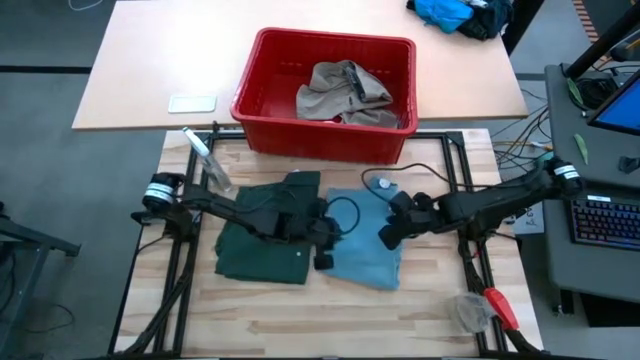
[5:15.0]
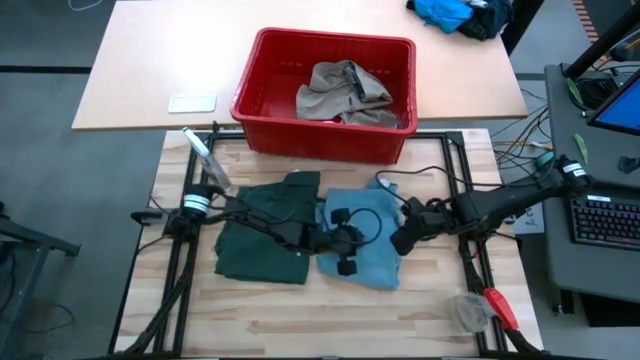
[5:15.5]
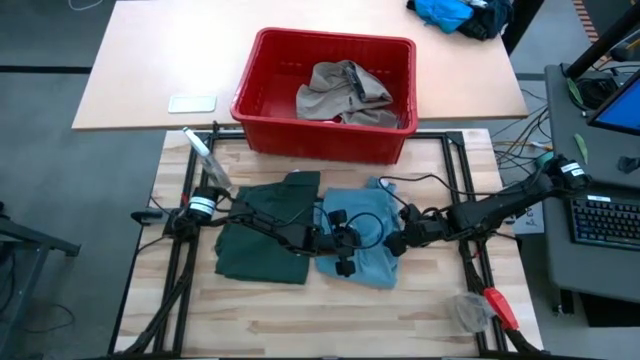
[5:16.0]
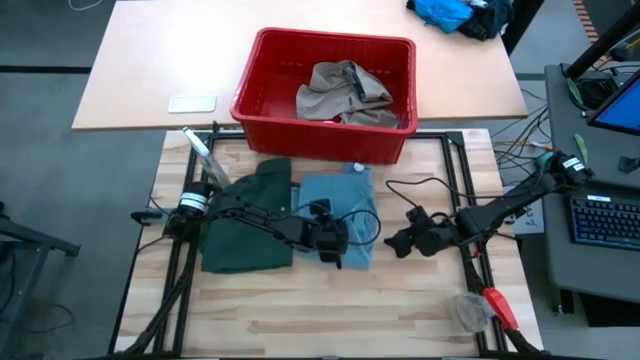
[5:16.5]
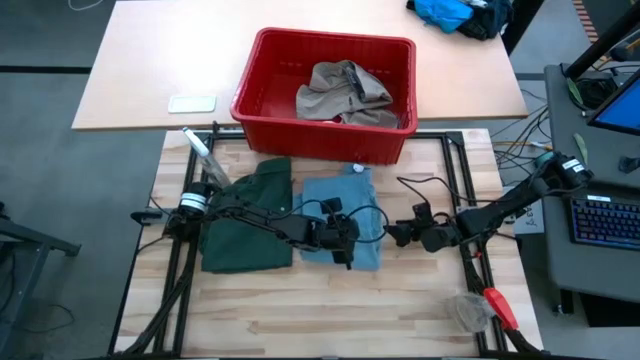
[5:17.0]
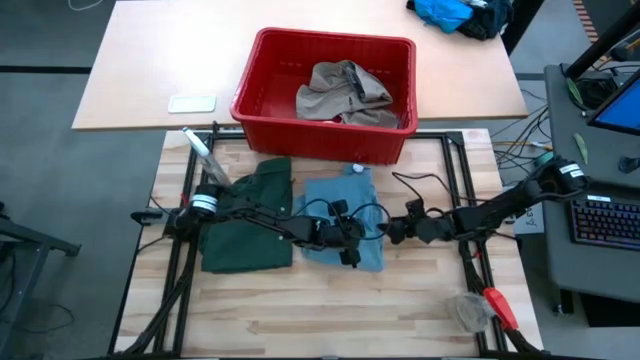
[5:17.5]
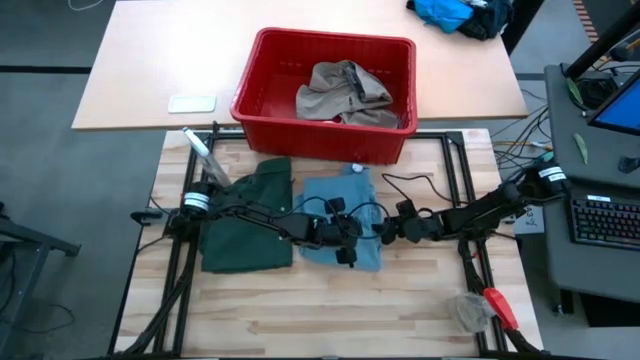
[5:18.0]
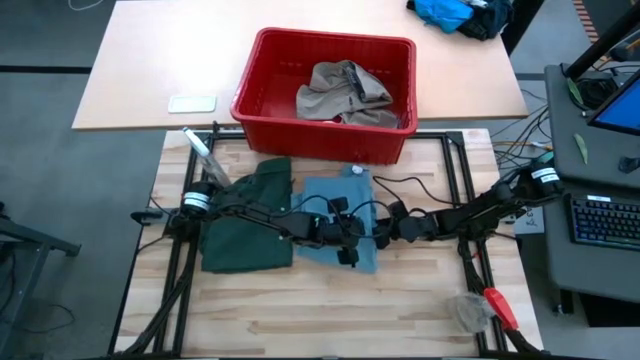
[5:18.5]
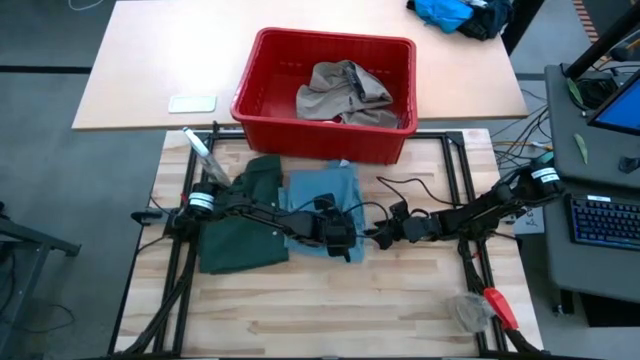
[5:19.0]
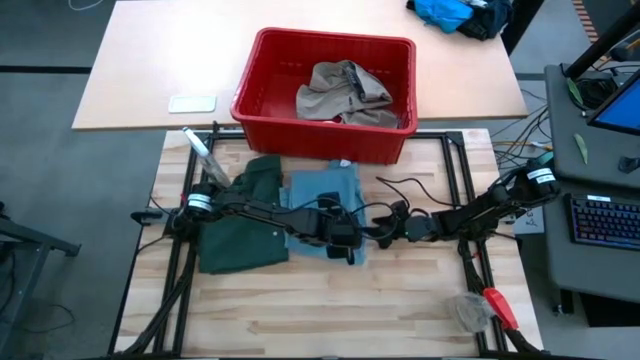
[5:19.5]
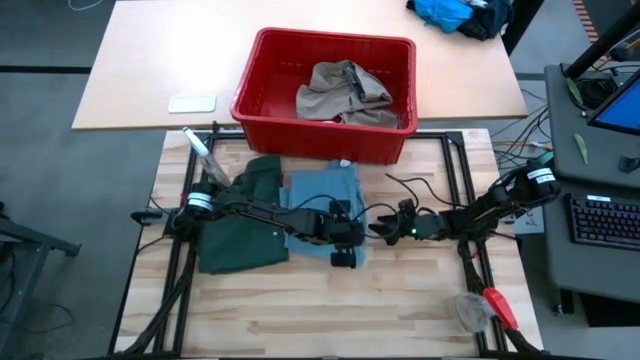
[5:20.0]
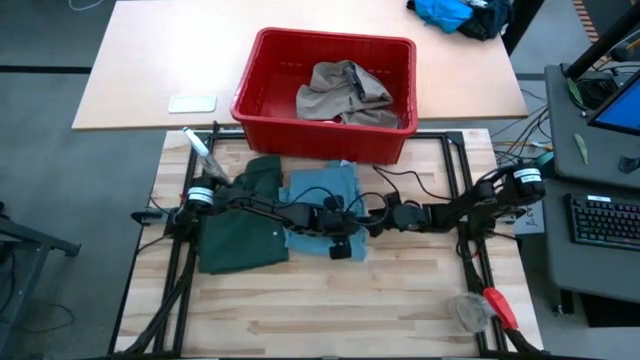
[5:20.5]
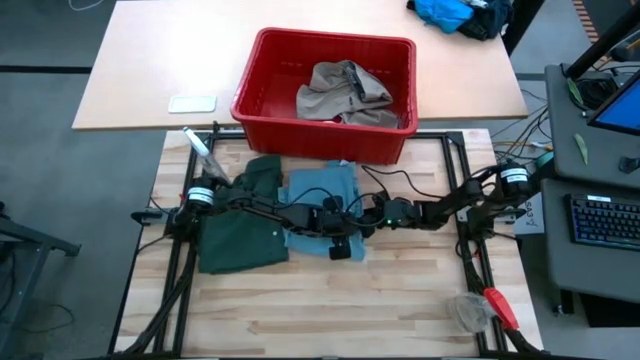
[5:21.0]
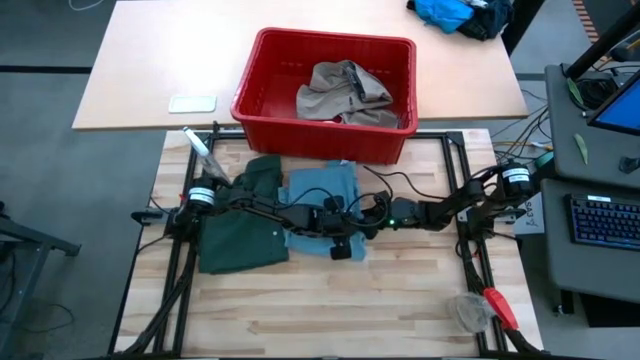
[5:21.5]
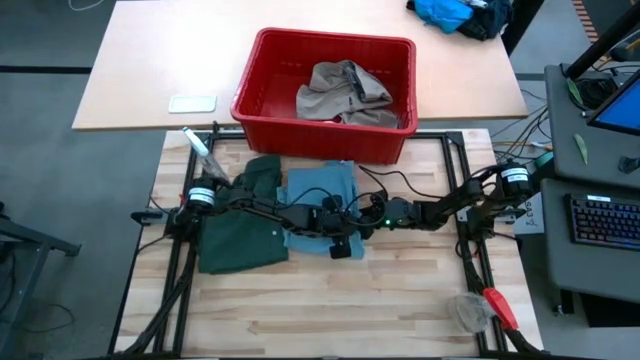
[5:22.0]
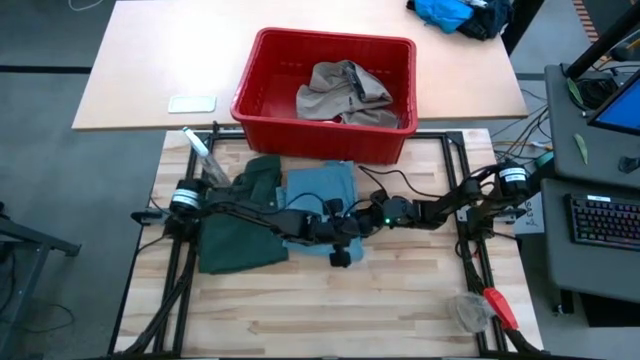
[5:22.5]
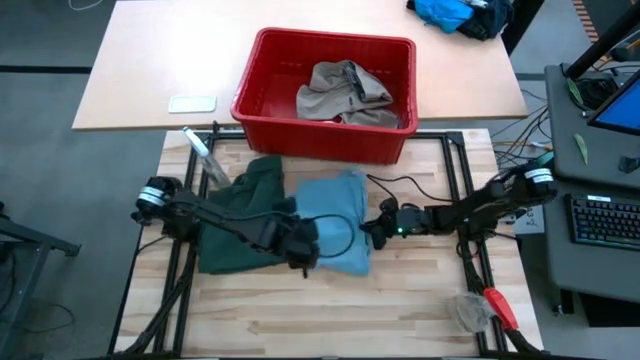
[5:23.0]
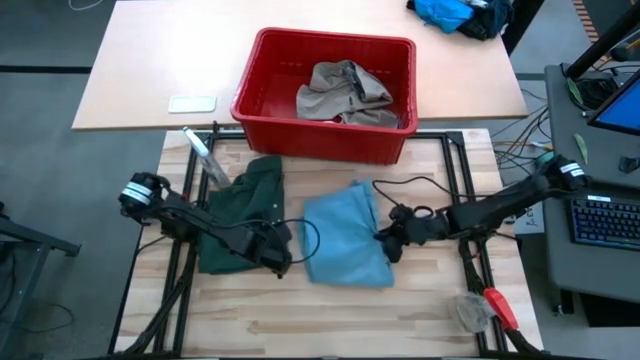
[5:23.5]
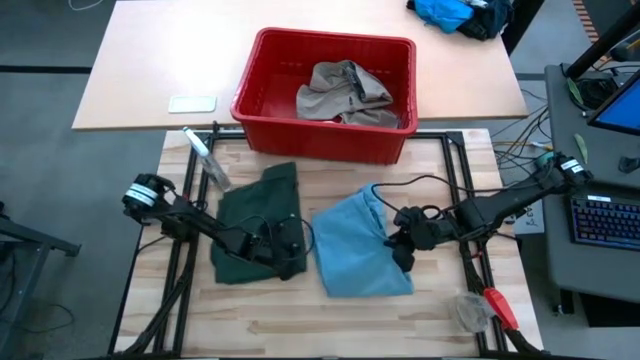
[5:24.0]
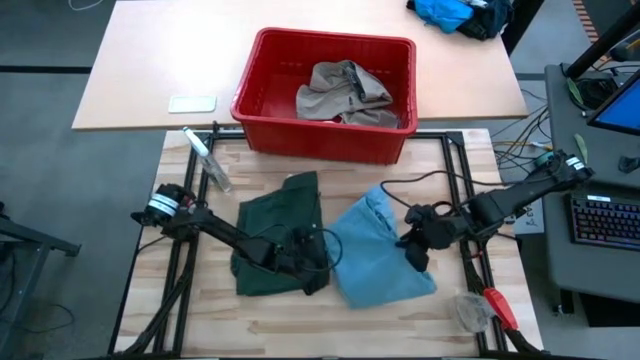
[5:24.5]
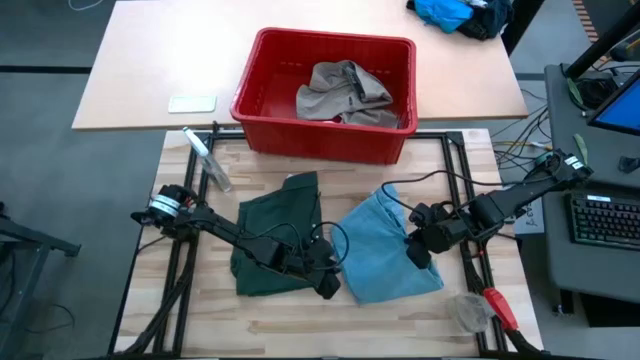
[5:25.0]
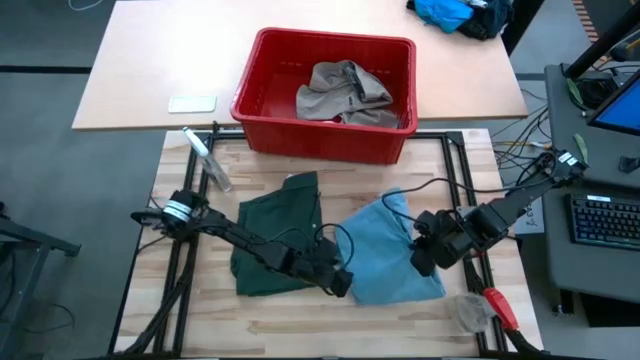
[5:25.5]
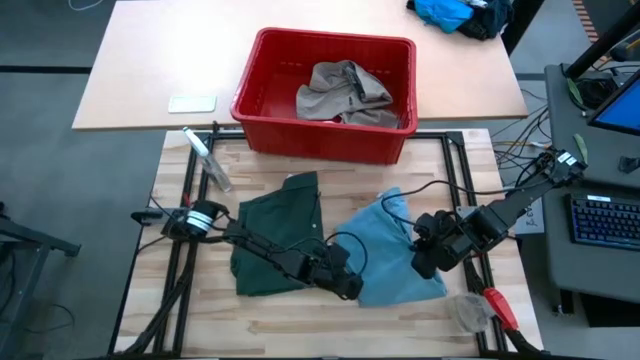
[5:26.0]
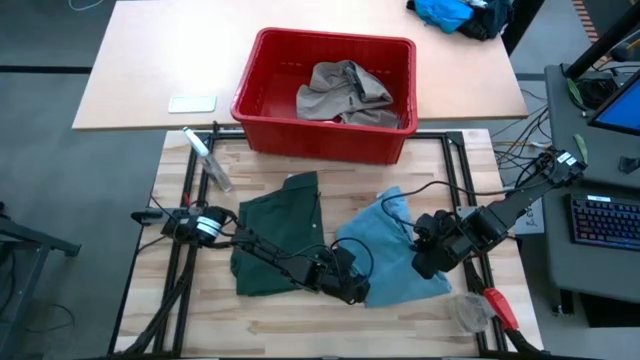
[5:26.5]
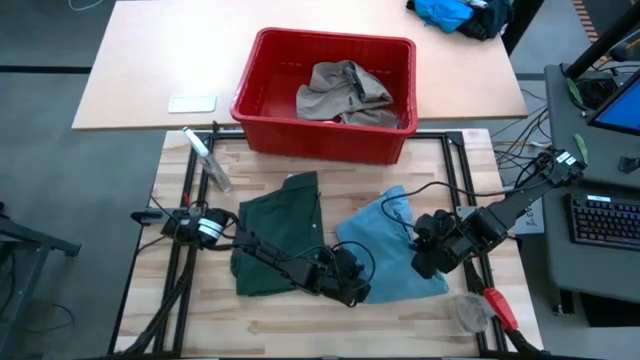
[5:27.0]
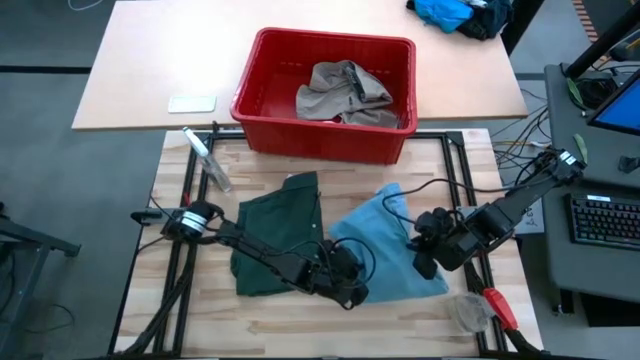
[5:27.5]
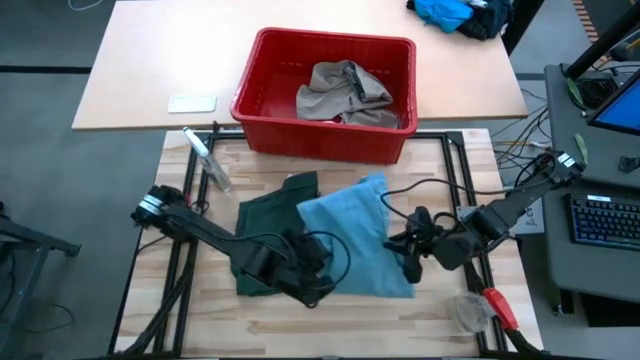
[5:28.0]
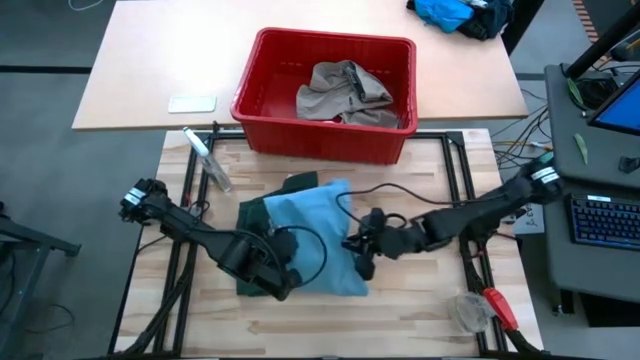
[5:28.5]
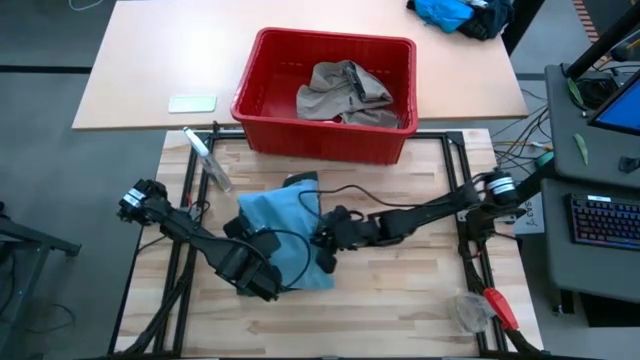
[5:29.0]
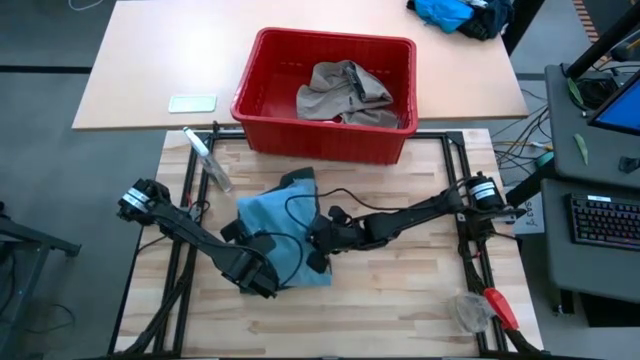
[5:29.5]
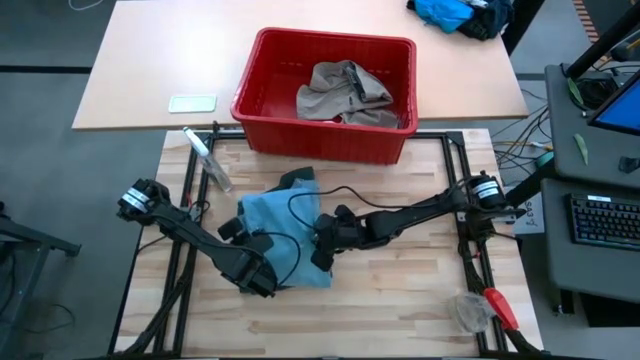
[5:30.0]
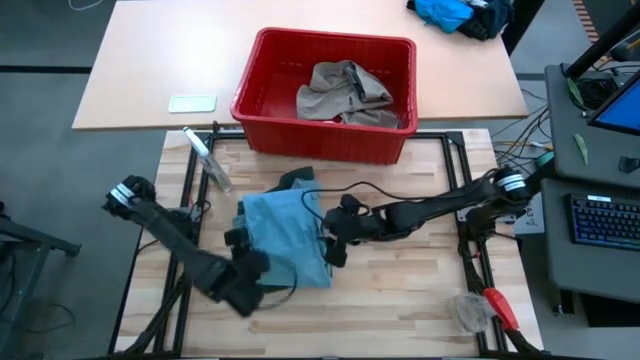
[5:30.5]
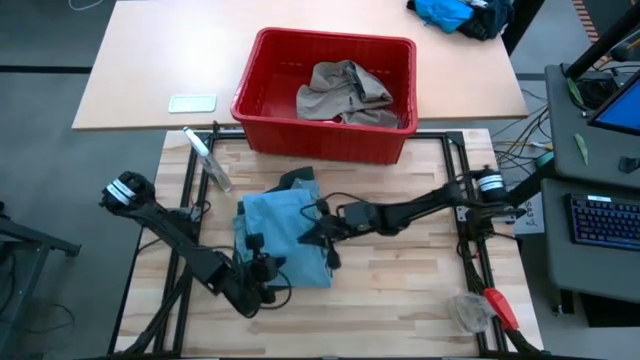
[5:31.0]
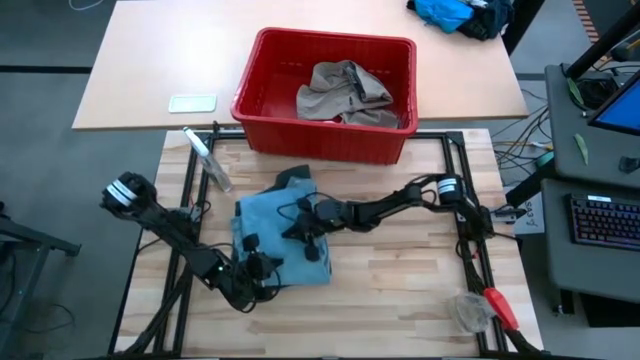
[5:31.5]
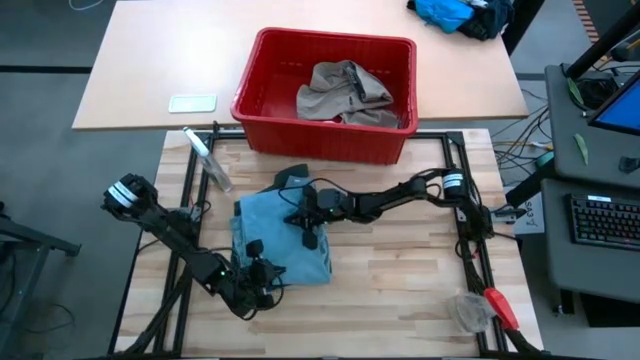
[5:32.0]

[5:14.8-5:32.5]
Task: Fold Laundry from Bin
Stack the blue jeans on top of the green polo shirt

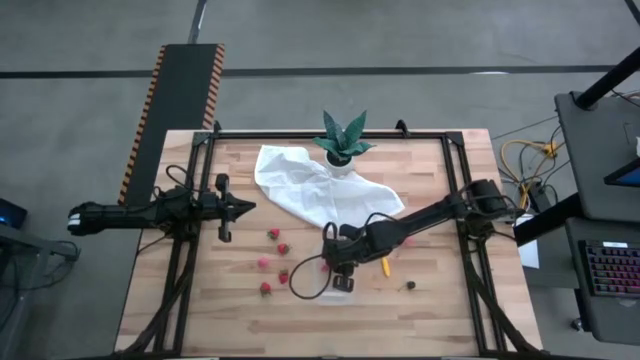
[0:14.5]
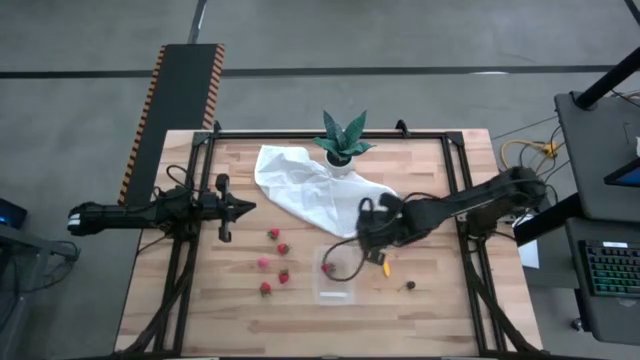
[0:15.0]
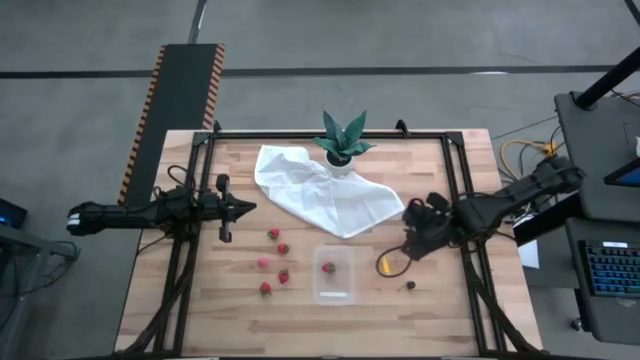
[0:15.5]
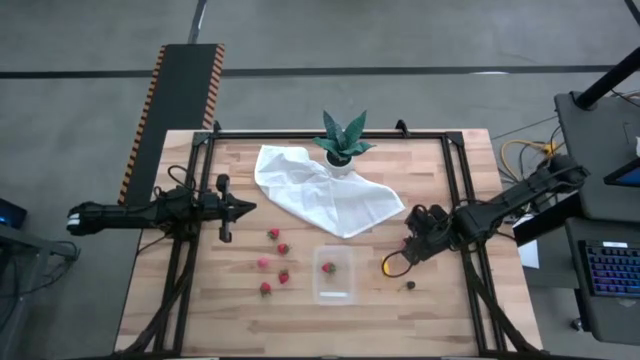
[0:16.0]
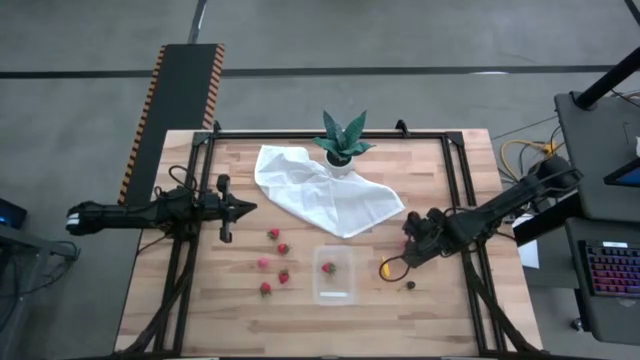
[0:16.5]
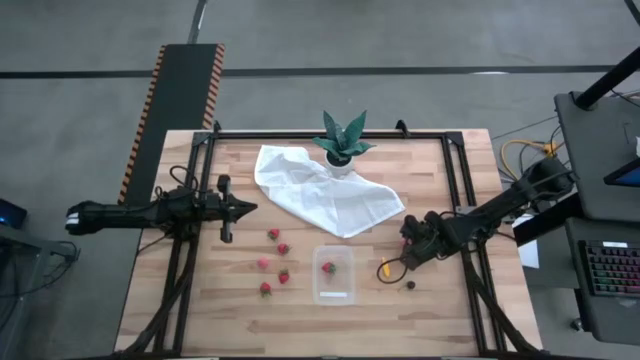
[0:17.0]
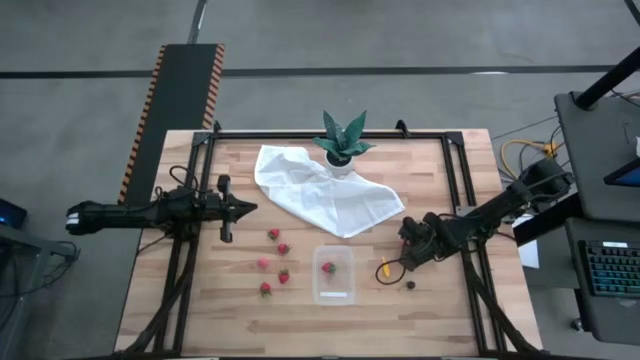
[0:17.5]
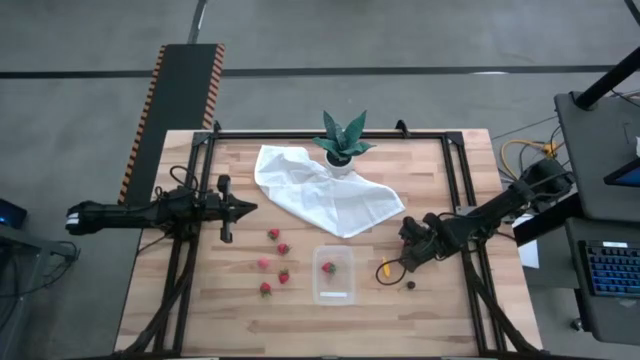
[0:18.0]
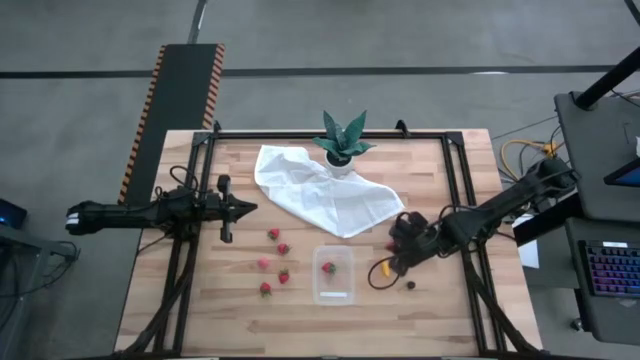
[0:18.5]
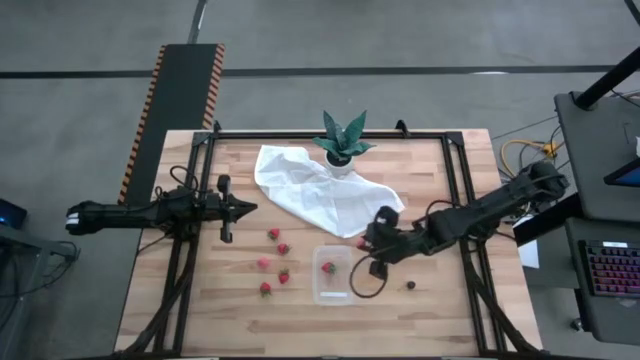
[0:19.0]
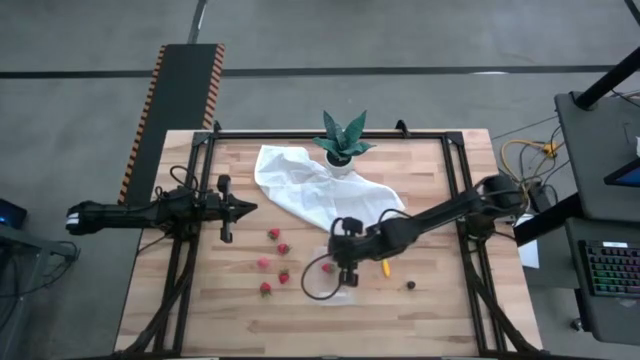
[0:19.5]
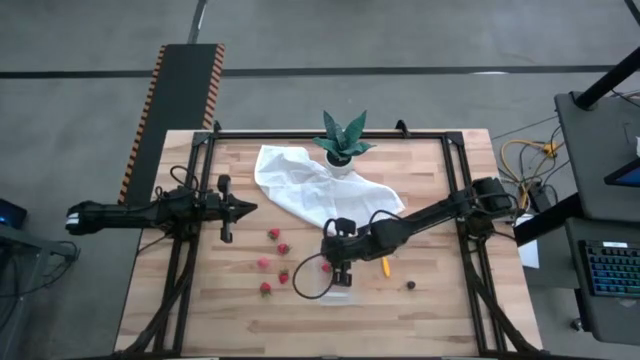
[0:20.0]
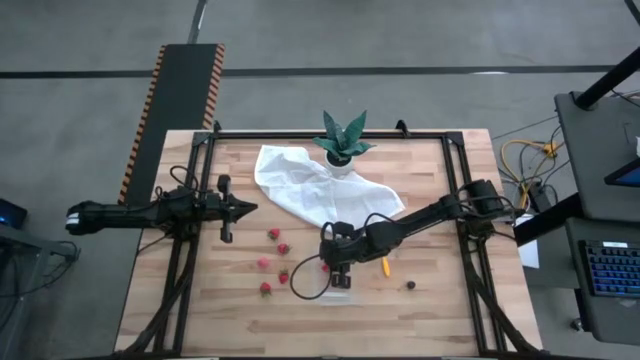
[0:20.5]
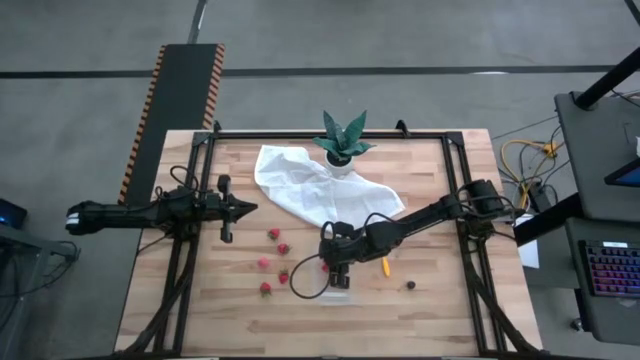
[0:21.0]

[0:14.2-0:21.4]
Task: Pick and placing Produce into tupperware
Put the pink peach into the transparent bin
